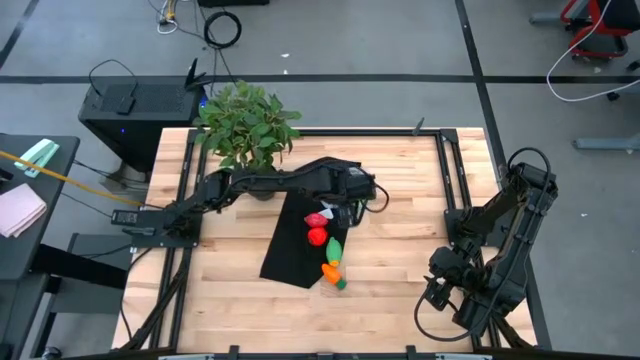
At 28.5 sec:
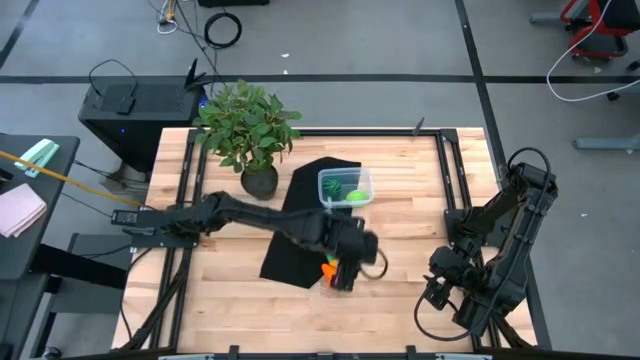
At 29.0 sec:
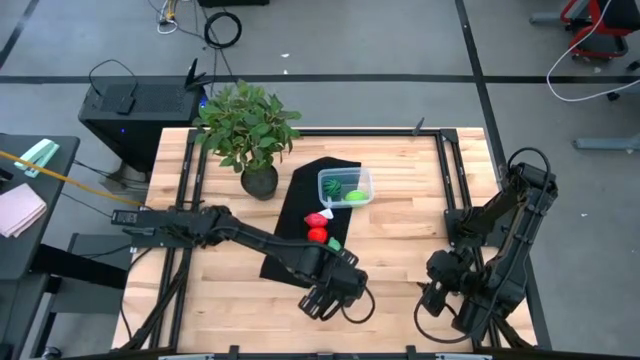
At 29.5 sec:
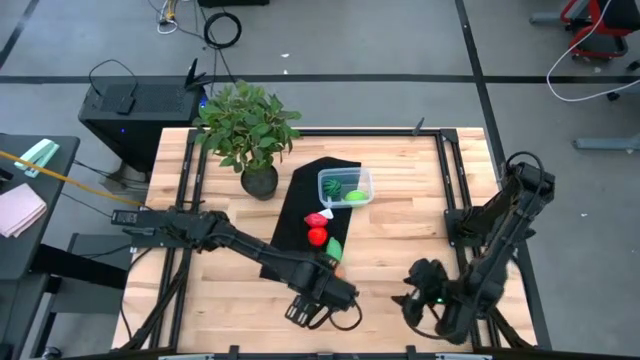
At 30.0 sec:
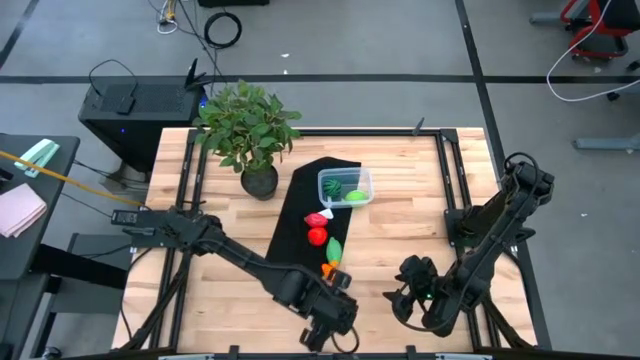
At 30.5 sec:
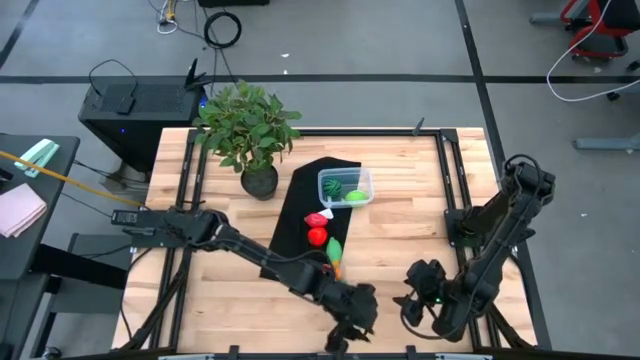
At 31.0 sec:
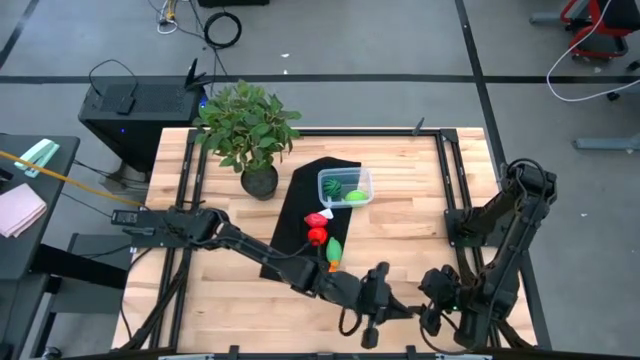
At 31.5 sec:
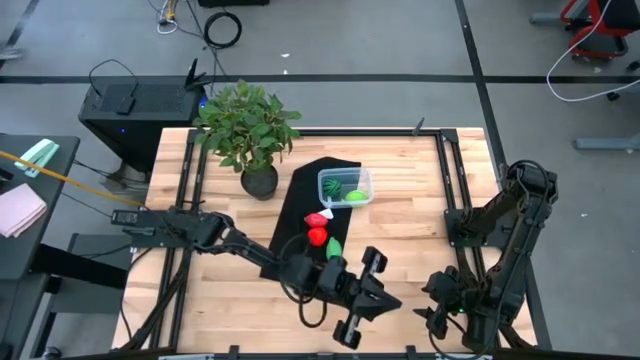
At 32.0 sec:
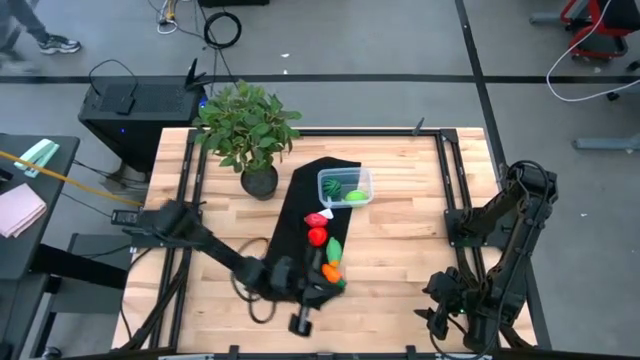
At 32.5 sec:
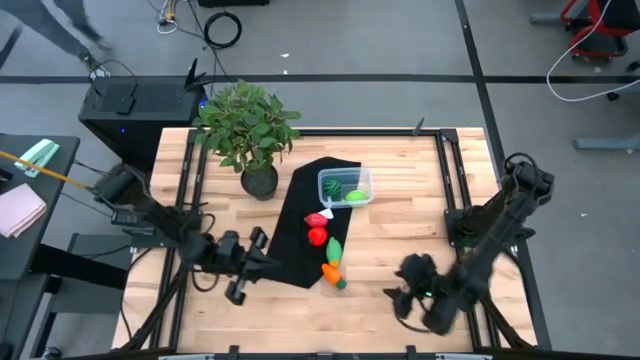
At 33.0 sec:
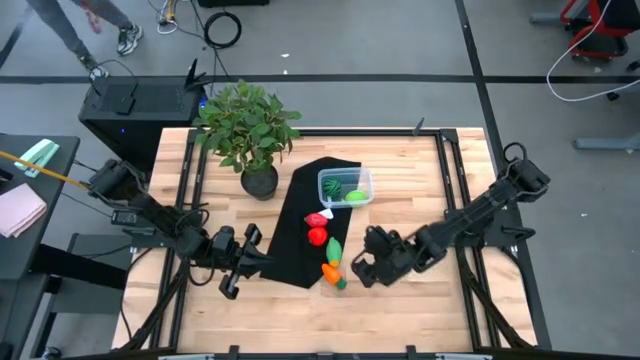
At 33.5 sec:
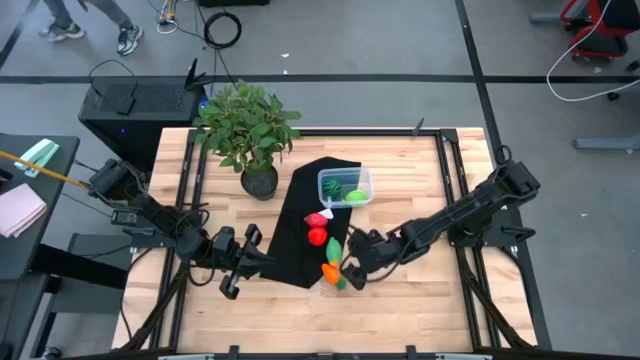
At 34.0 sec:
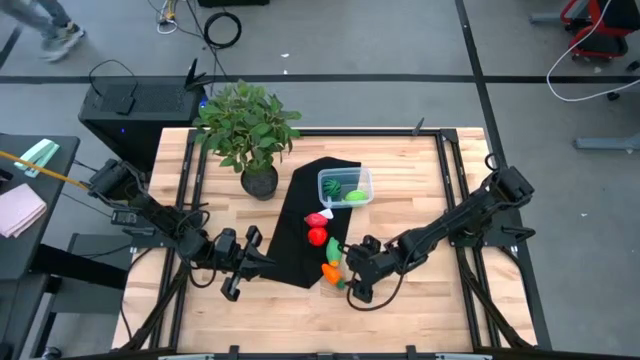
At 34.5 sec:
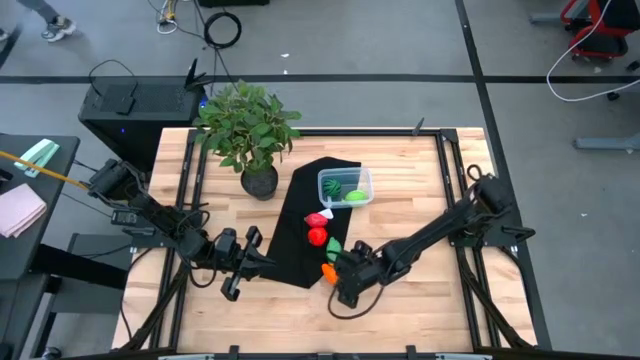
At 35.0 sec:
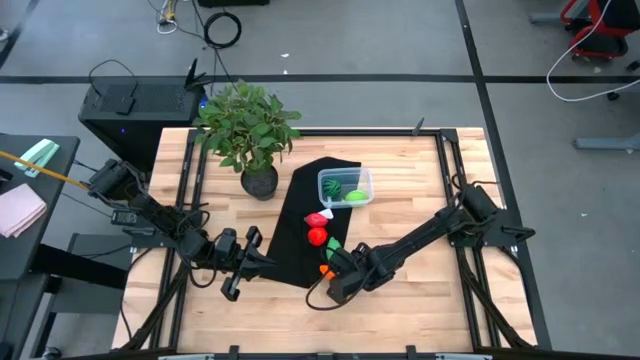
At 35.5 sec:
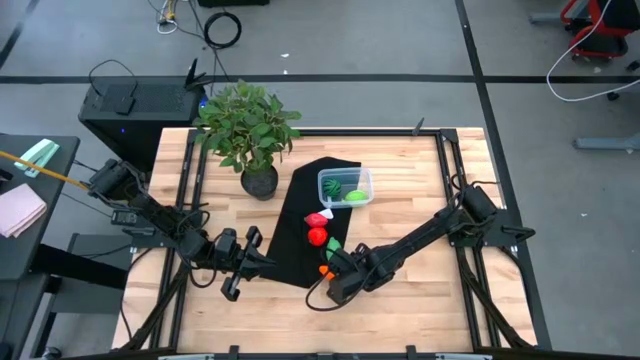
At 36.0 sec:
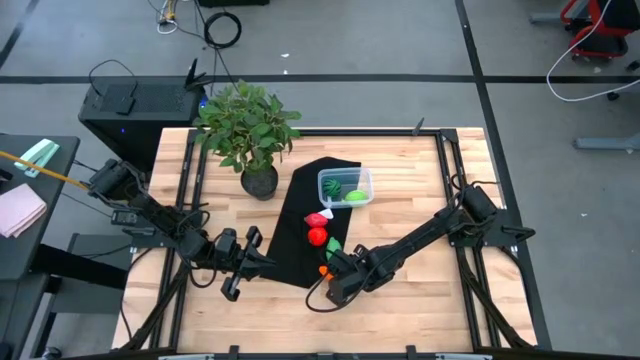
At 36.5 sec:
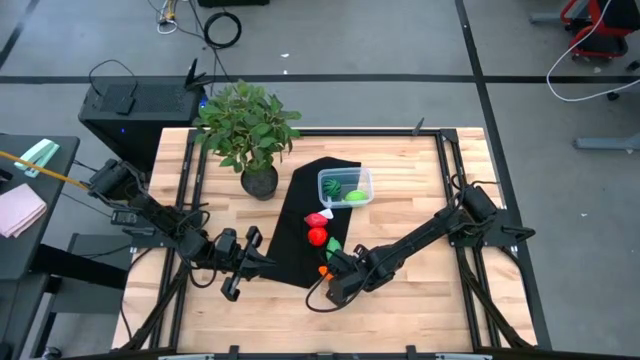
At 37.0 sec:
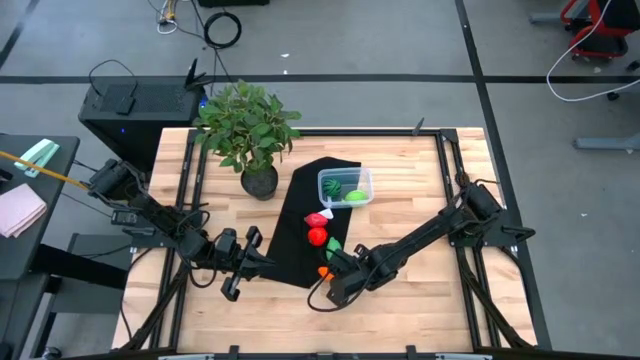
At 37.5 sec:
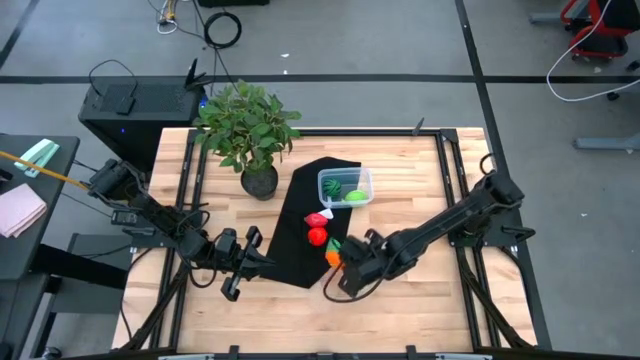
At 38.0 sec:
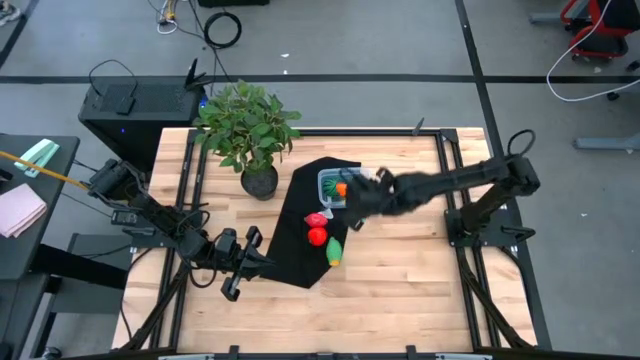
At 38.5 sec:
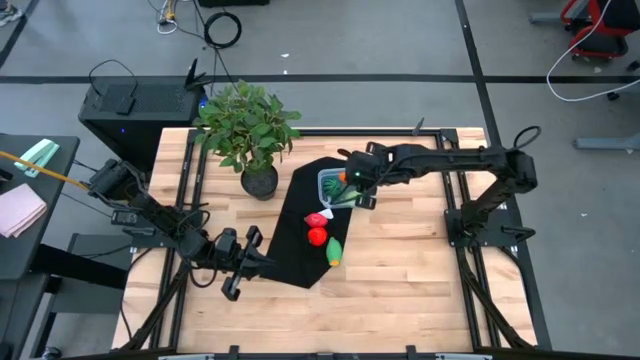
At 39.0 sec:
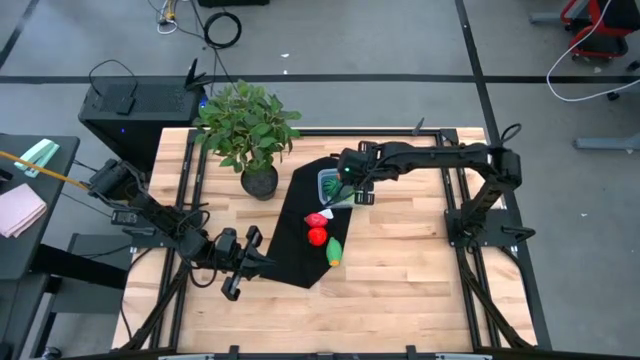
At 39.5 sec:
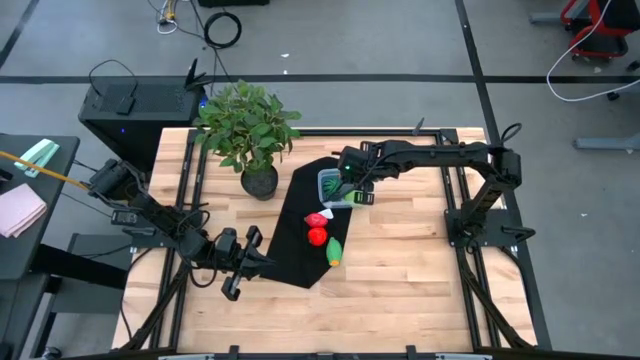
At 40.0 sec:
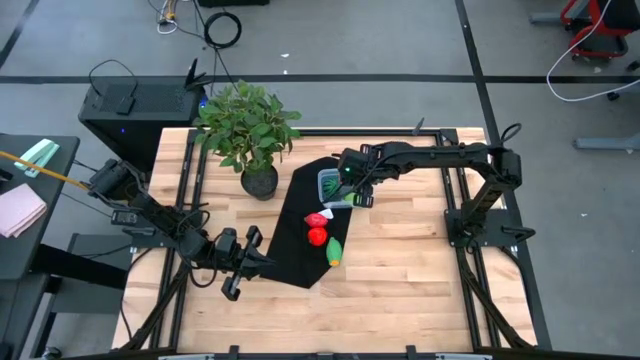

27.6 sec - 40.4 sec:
Task: Pick and placing Produce into tupperware
Put the carrot into the transparent bin

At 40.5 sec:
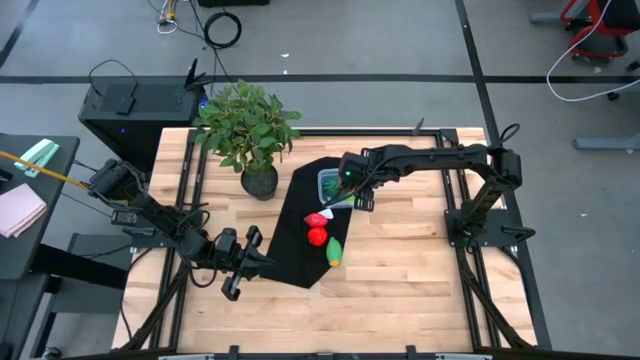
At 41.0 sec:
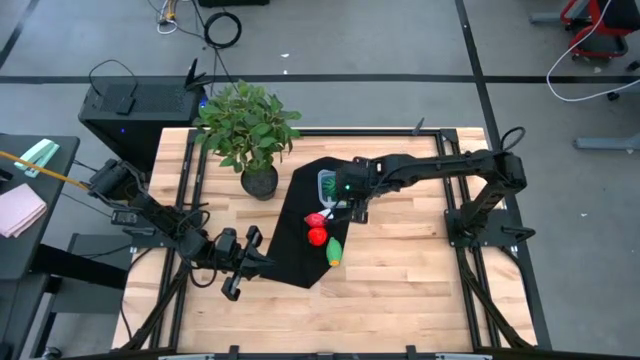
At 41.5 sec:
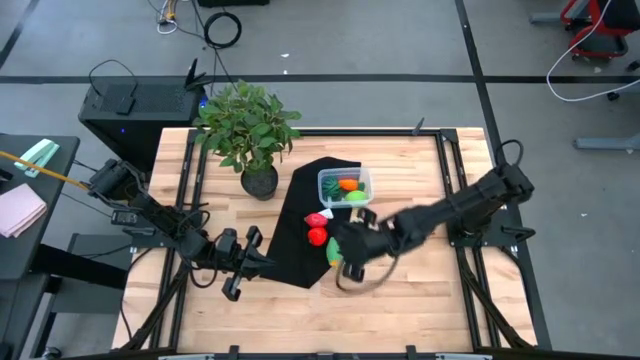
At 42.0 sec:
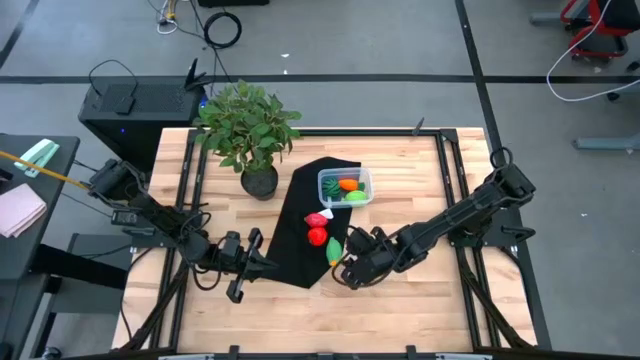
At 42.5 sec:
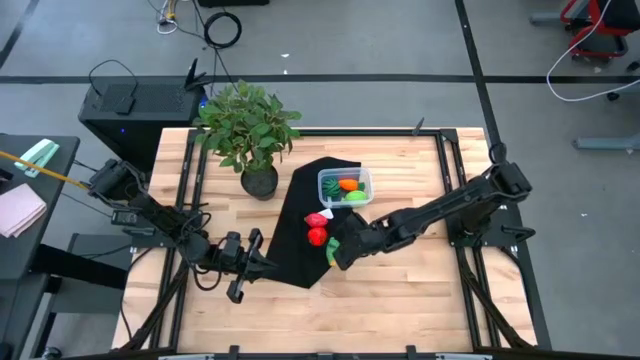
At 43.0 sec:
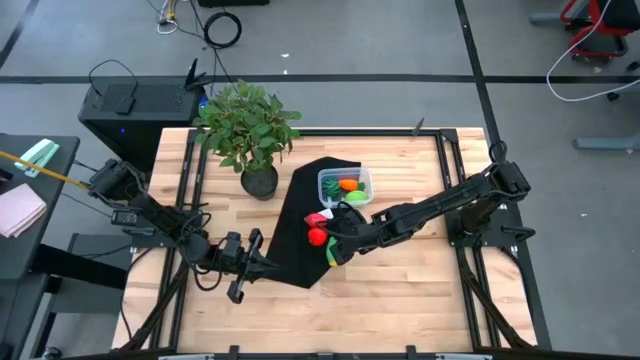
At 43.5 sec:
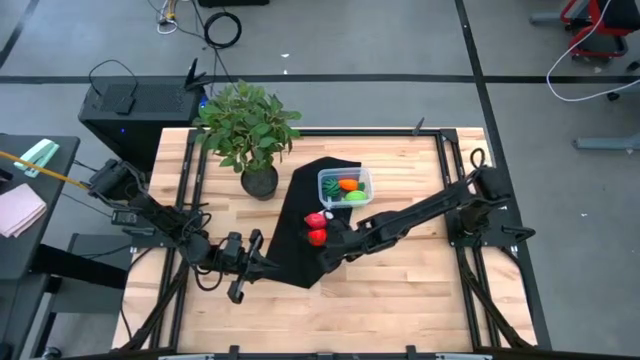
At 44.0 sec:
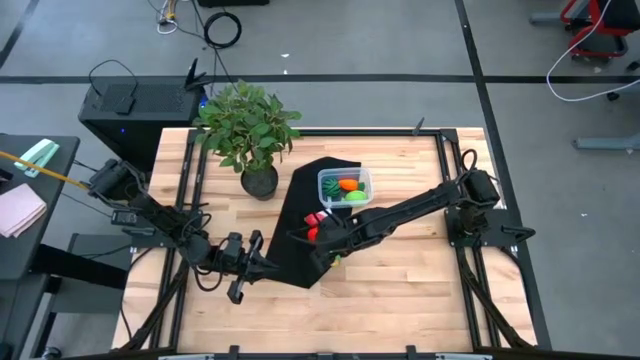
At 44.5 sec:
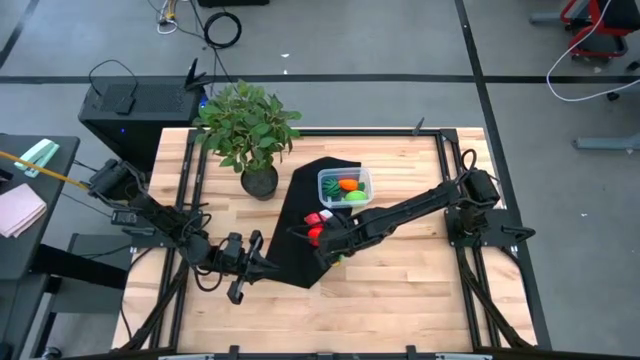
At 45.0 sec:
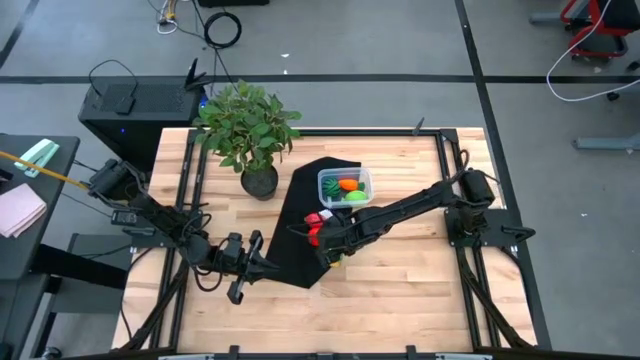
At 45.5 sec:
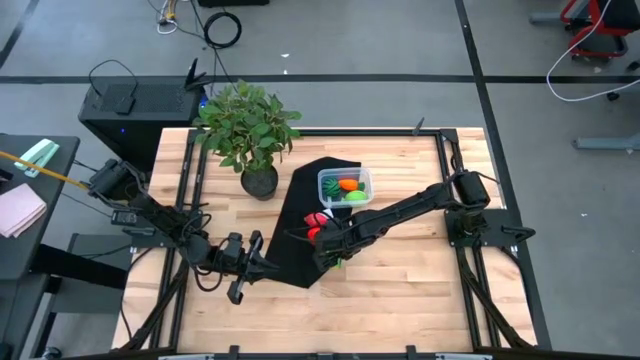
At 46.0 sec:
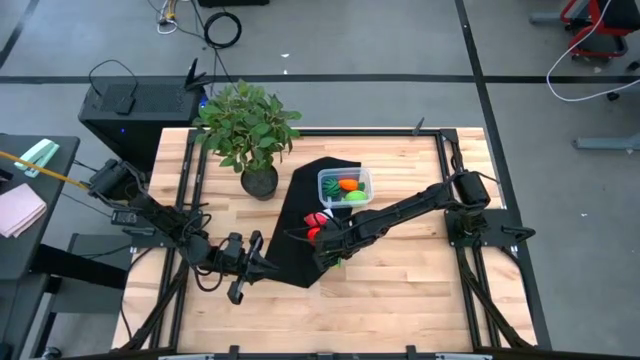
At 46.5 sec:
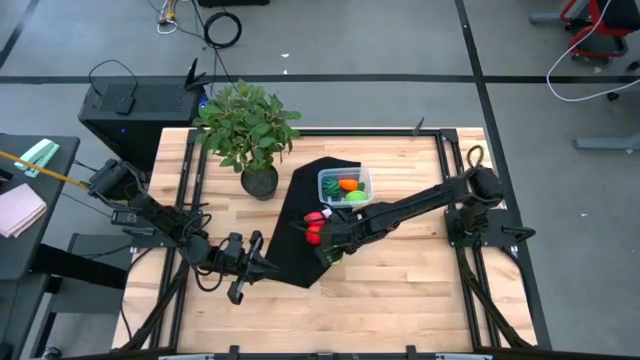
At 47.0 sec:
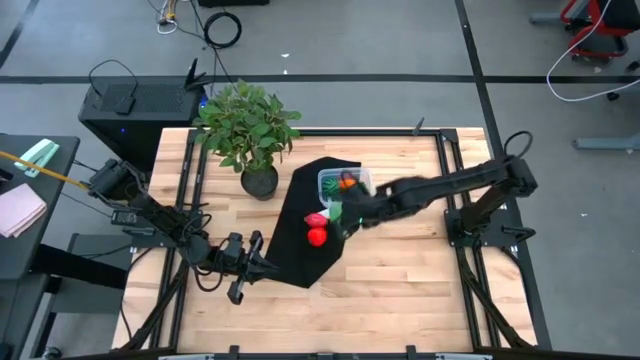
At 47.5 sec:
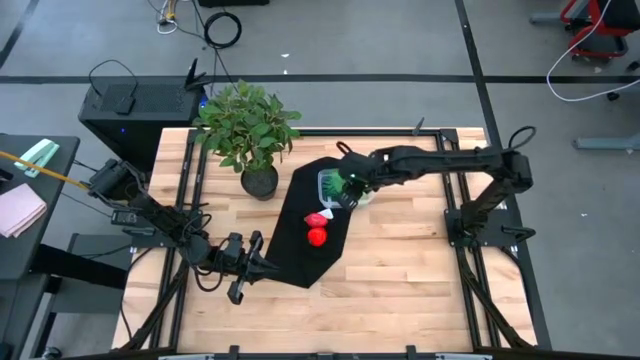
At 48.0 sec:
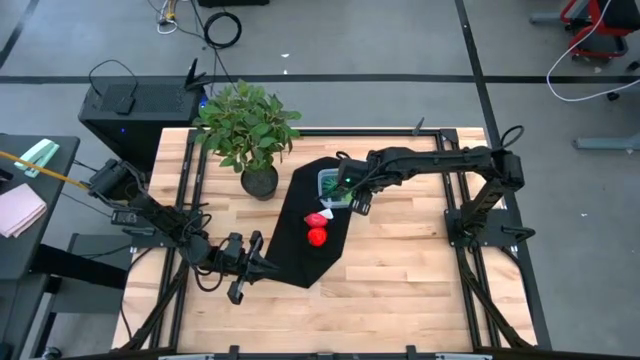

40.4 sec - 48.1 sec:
Put the sweetcorn into the transparent bin

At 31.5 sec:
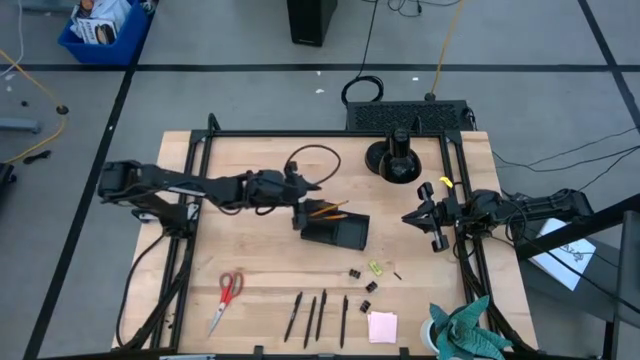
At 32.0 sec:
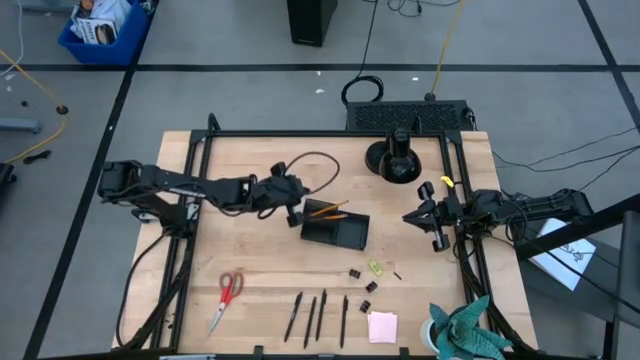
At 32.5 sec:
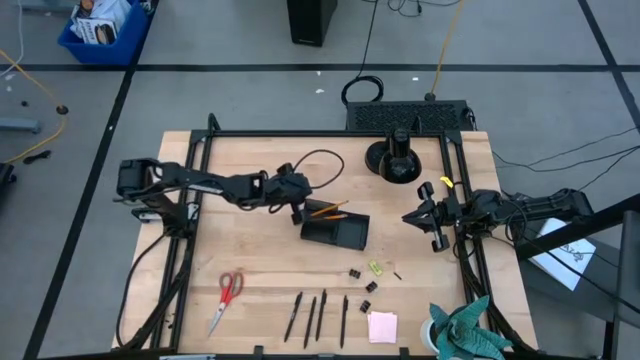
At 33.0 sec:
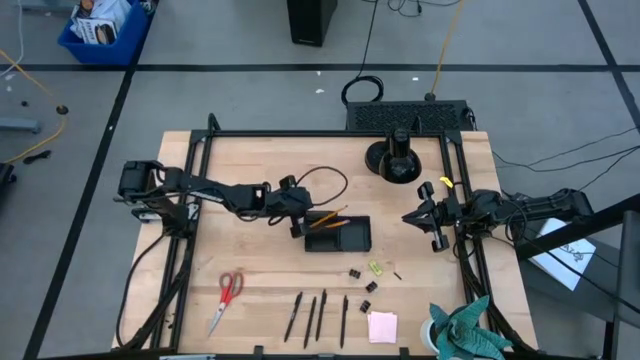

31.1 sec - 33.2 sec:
Task: Pick and place office supplies into organizer
Adjust the black desk organizer
